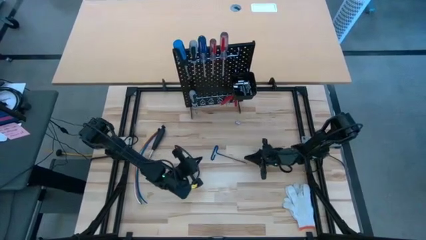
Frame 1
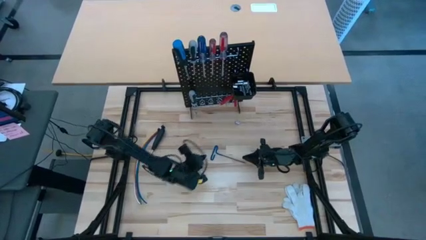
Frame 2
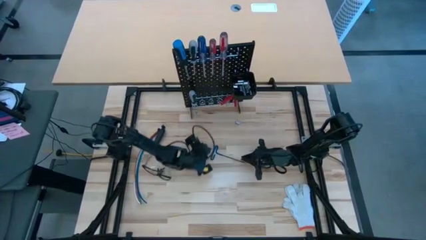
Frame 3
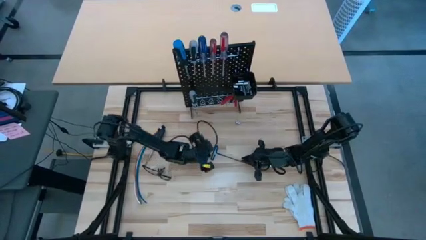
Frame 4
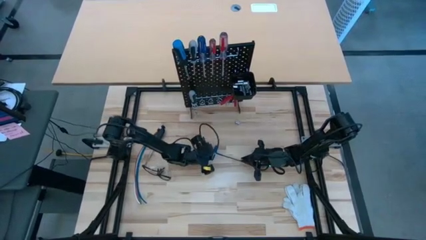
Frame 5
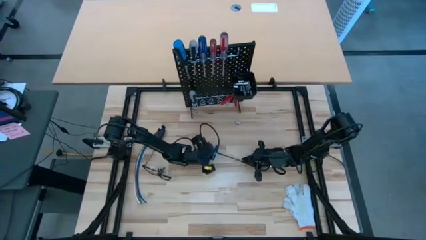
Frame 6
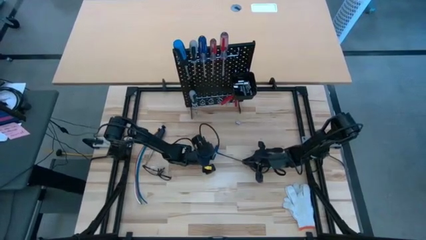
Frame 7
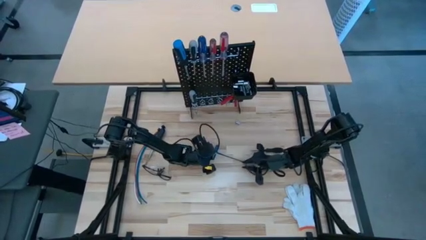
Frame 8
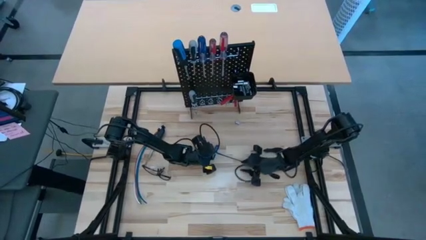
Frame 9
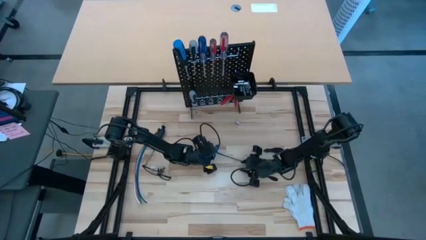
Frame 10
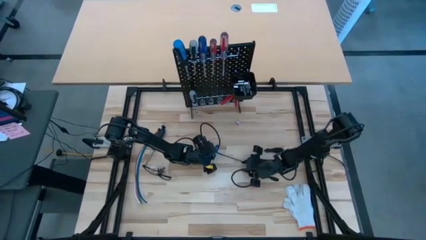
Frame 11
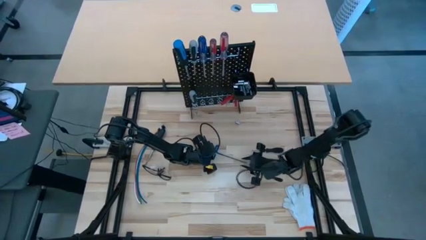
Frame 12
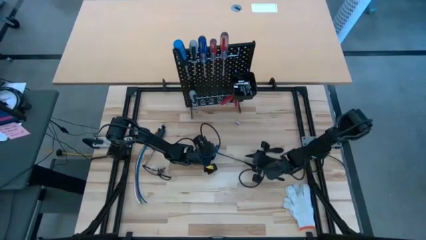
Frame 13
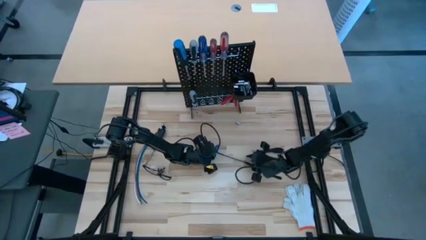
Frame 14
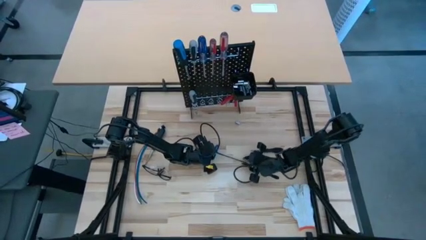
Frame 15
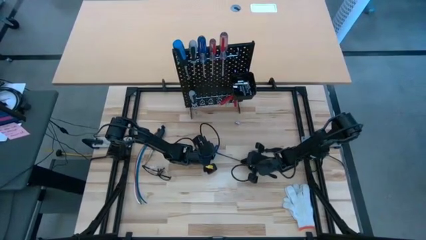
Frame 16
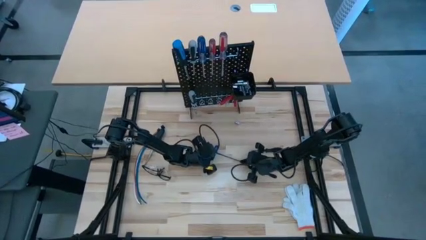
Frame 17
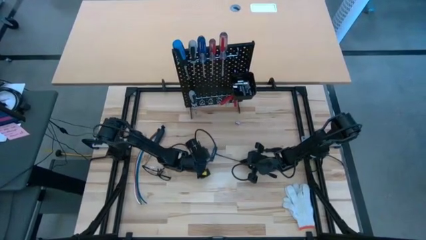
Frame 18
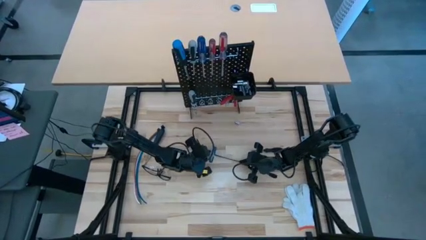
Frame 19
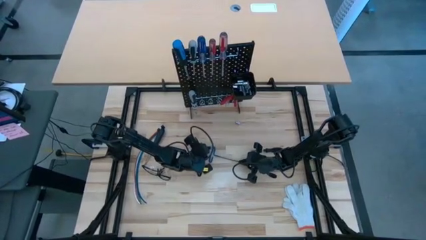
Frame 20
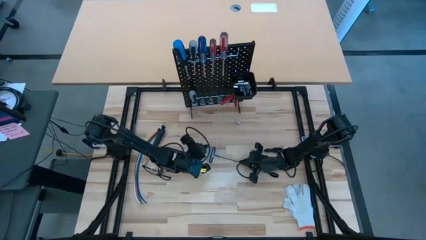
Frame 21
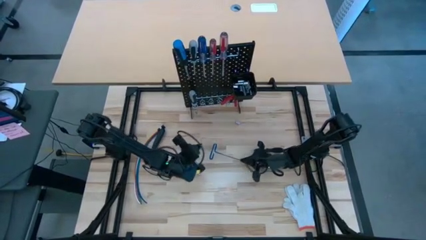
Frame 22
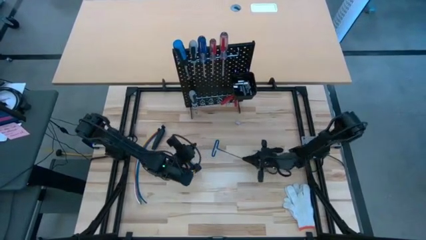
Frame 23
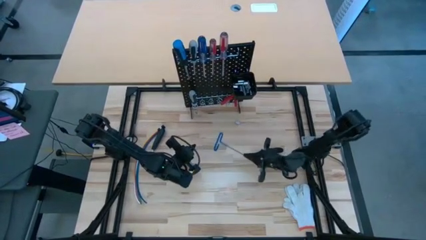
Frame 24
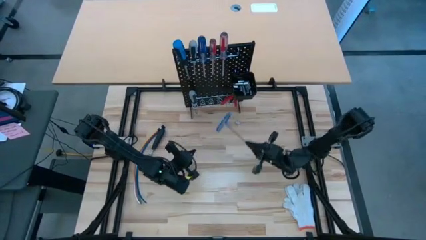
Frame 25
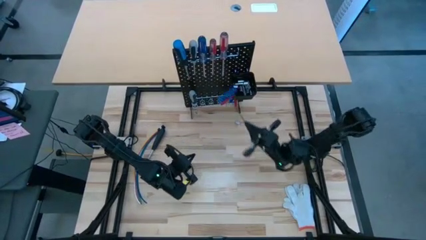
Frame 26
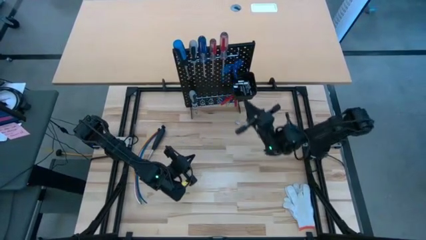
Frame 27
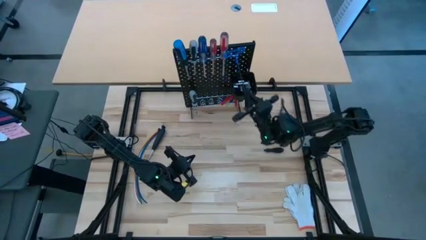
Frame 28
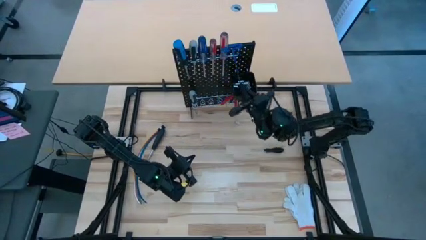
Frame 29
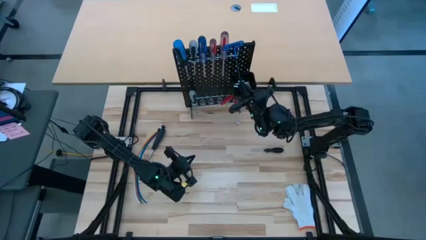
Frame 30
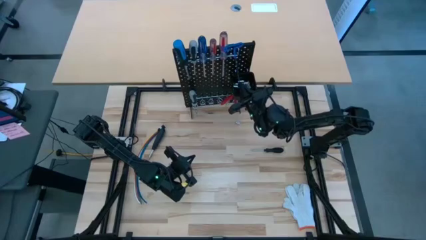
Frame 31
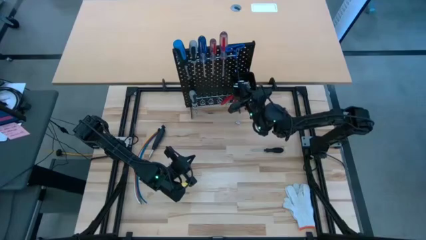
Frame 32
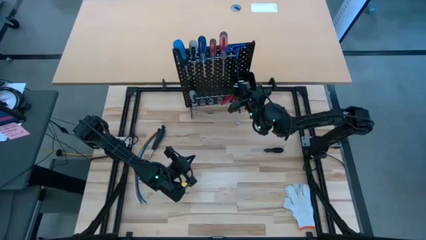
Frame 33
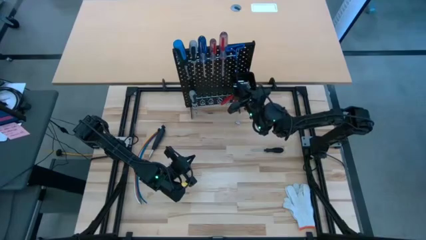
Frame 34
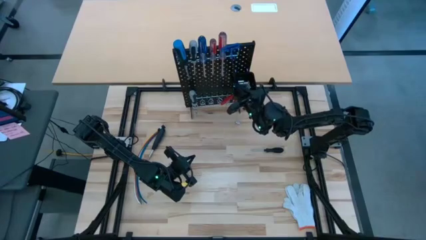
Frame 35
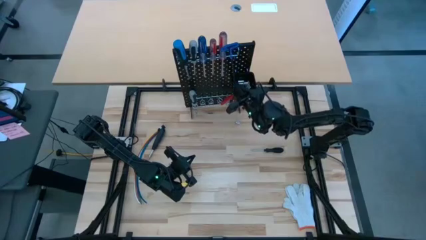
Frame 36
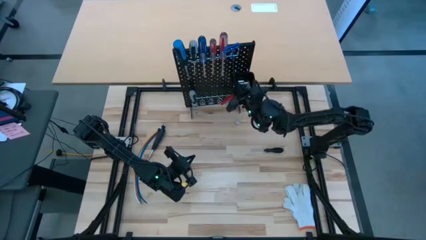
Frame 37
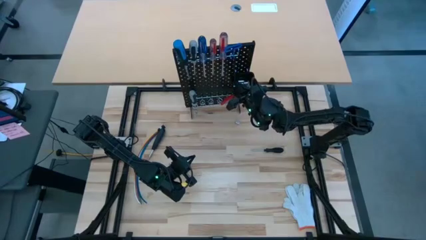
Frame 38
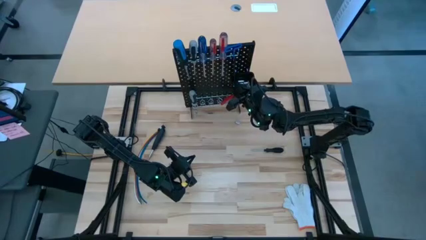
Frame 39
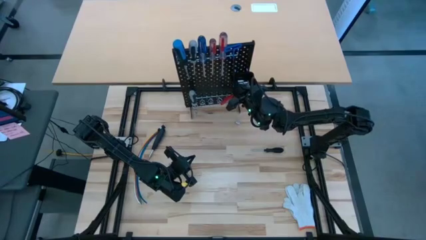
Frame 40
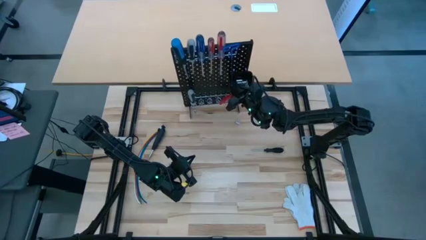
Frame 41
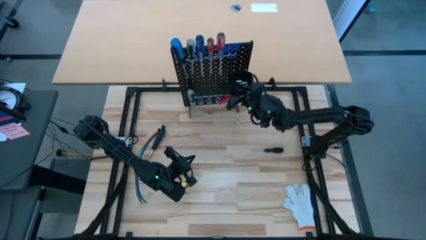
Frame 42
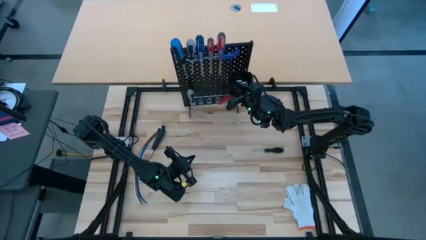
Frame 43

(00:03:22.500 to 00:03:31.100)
Task: Hang tools onto peg board
Hang the pick tool on the pegboard

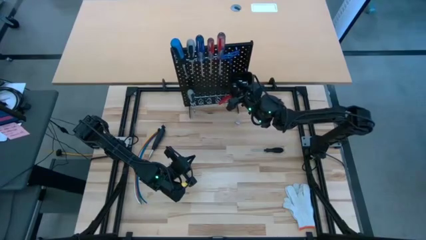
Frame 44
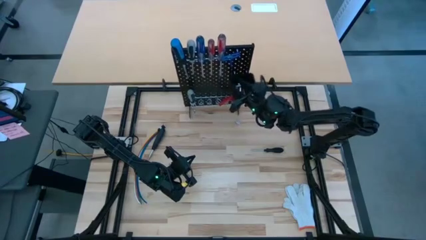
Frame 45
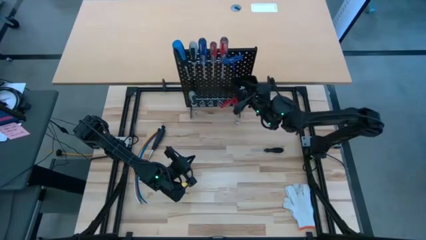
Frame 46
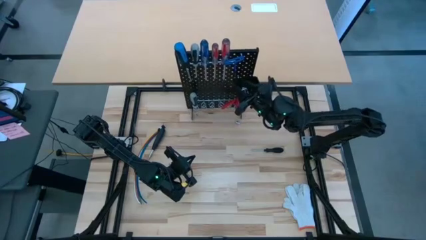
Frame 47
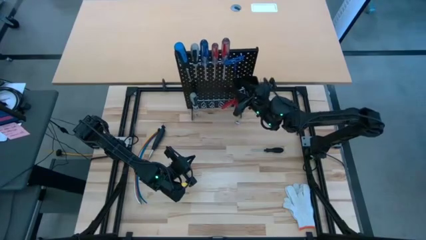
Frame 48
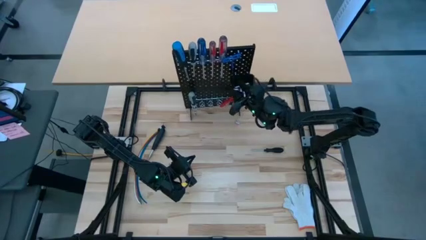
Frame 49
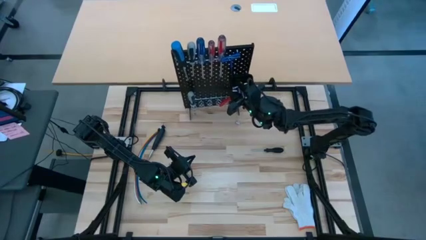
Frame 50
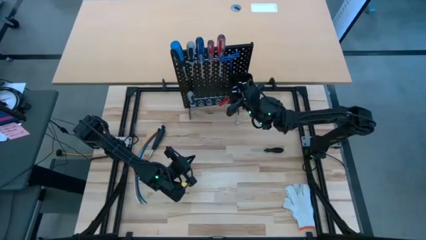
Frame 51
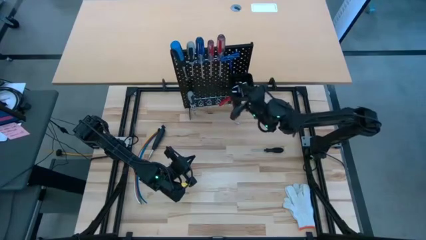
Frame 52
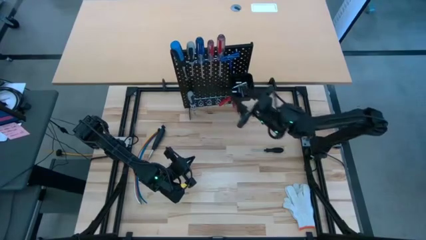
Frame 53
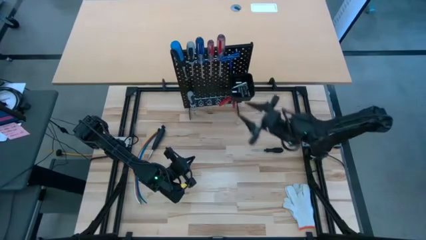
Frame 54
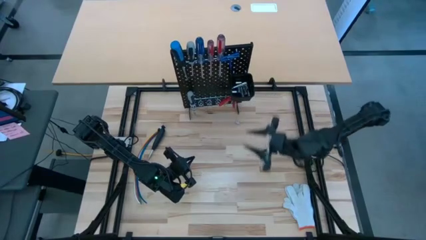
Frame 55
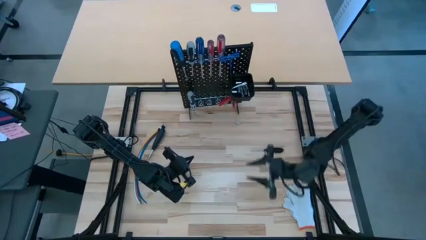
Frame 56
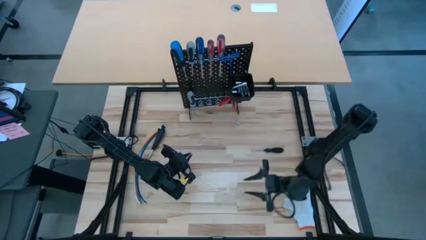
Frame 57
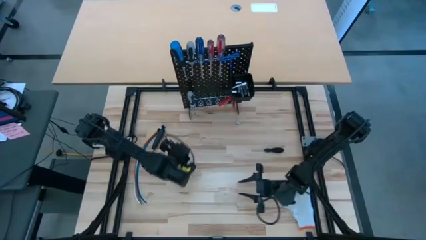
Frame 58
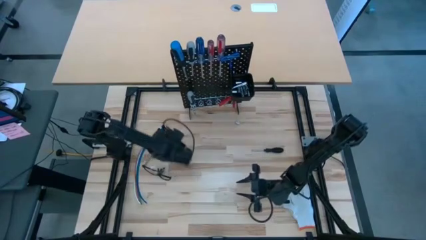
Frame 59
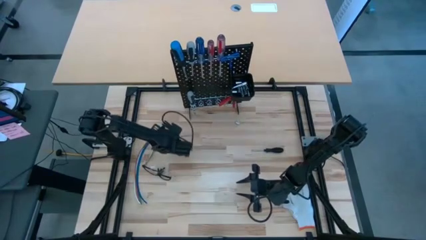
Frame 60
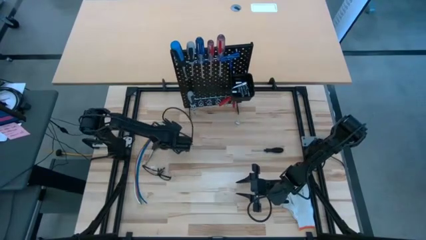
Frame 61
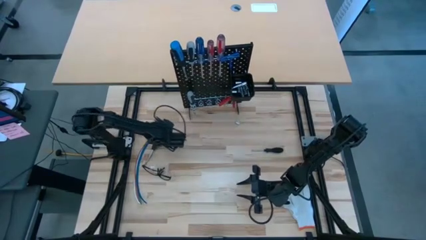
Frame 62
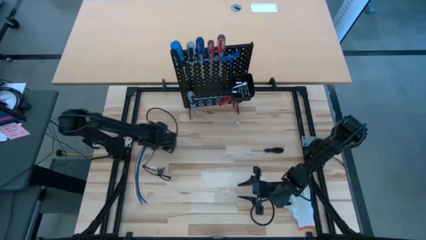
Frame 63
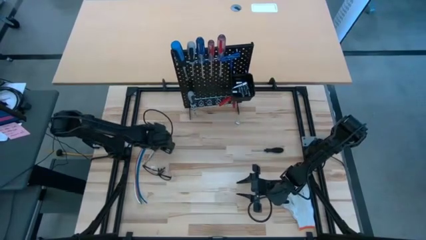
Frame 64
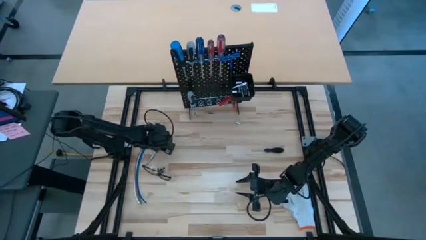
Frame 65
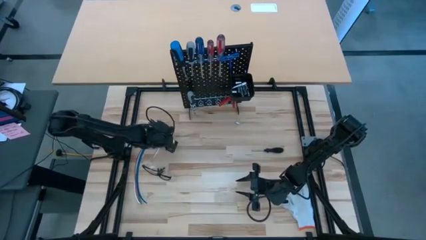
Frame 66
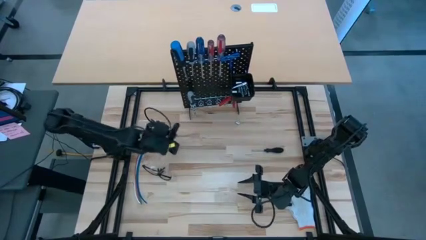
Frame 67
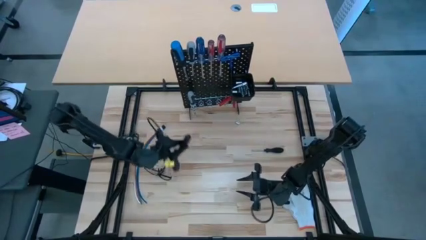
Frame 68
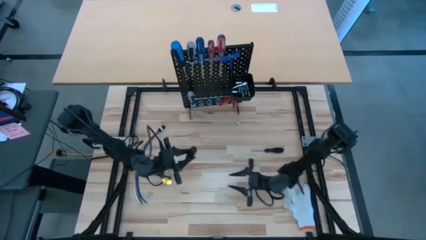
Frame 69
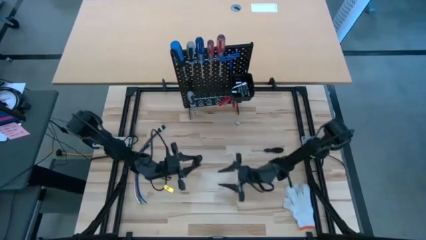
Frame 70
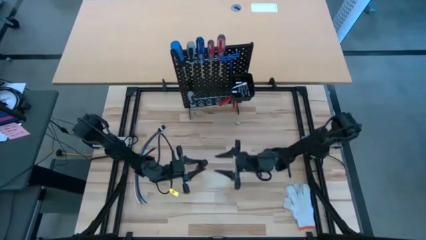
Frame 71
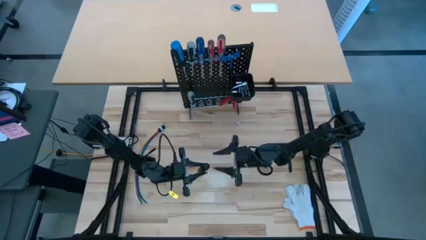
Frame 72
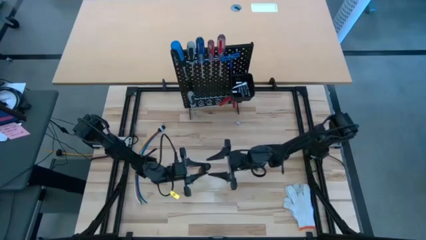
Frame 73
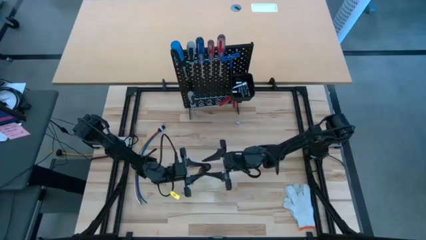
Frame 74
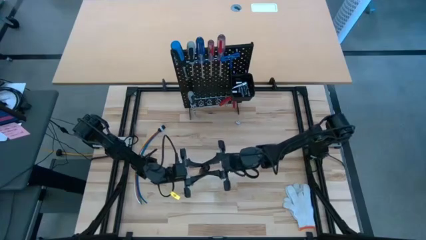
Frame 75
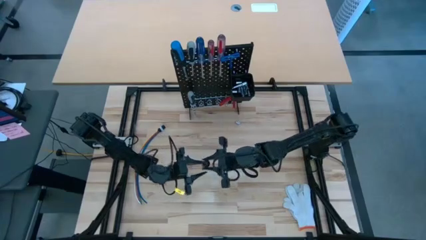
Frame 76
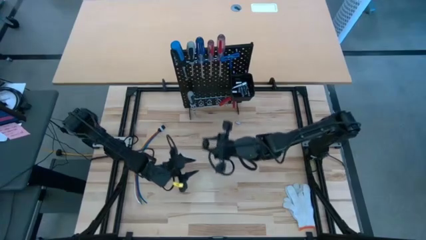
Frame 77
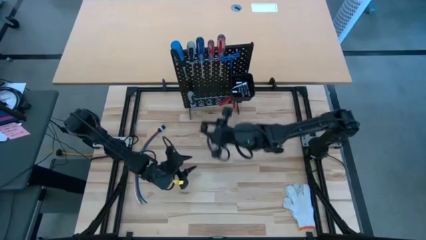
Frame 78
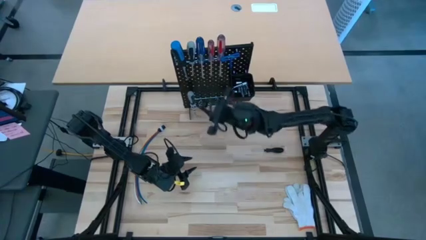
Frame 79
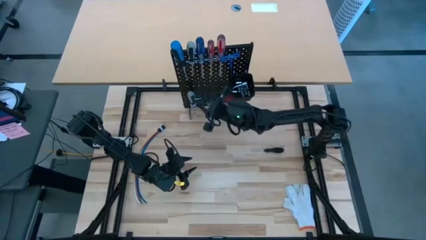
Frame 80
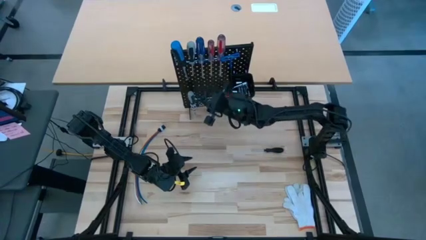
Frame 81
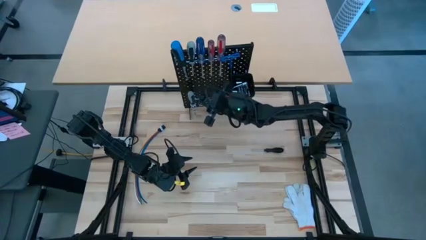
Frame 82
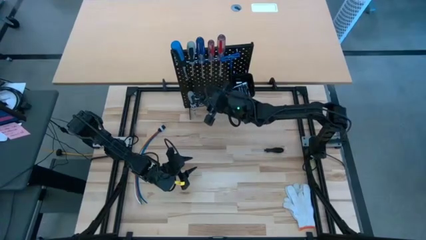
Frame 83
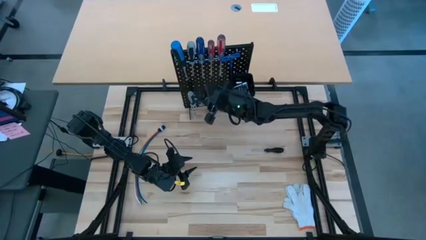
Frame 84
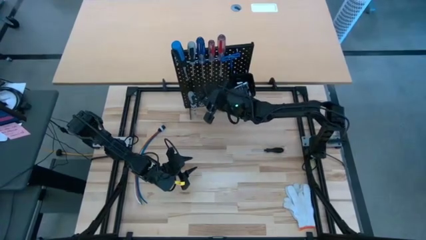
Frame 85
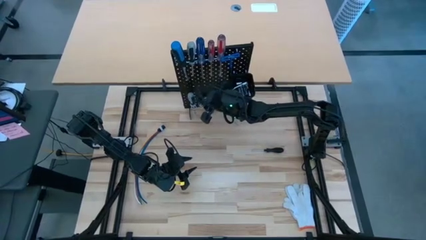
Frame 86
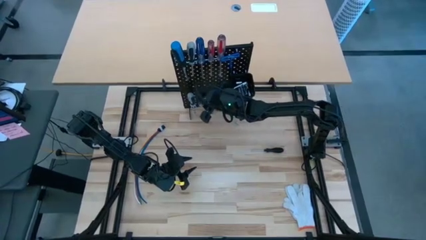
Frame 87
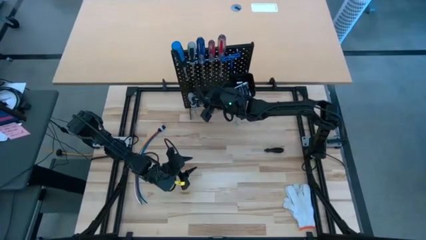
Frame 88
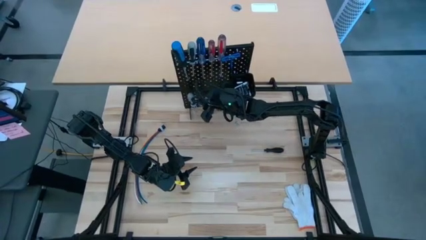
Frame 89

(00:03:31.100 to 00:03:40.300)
Hang the black screwdriver on the pegboard
